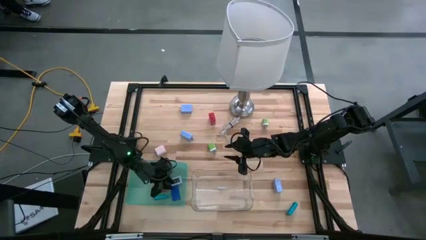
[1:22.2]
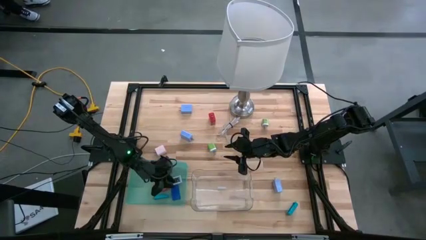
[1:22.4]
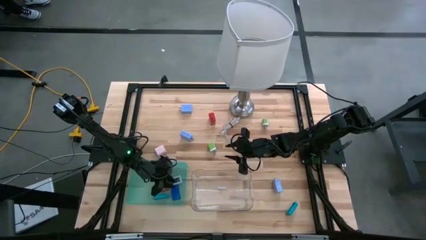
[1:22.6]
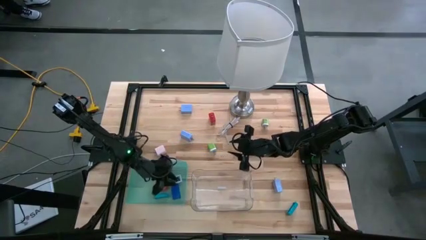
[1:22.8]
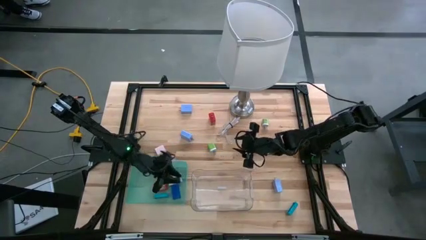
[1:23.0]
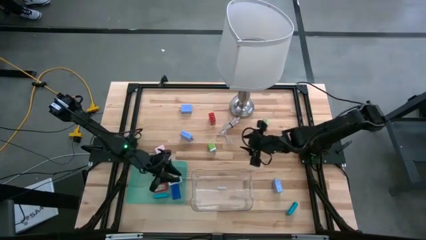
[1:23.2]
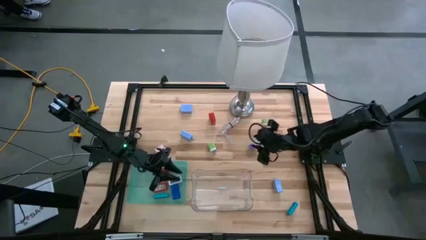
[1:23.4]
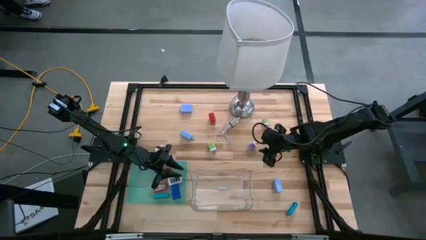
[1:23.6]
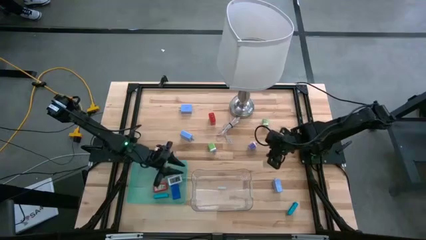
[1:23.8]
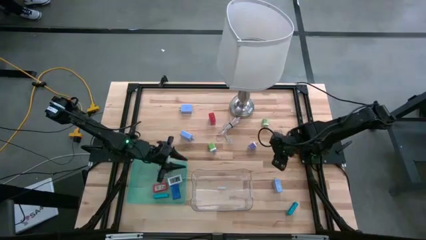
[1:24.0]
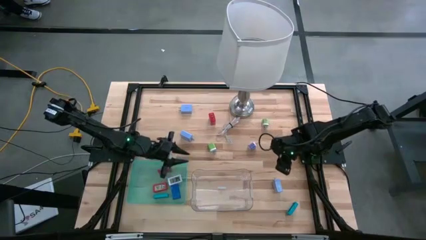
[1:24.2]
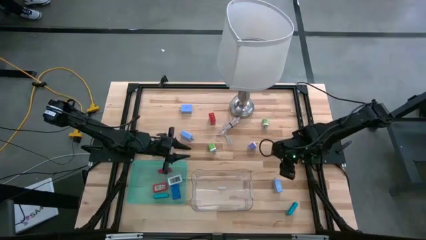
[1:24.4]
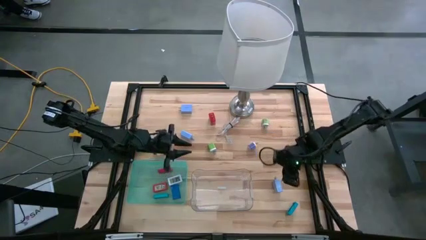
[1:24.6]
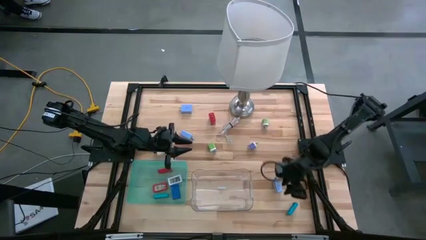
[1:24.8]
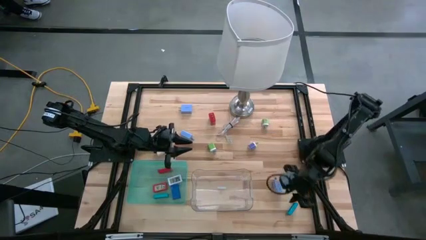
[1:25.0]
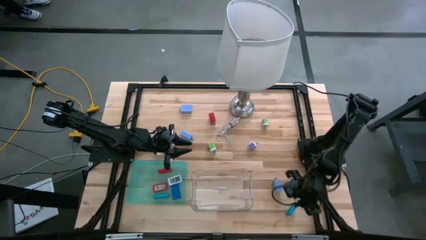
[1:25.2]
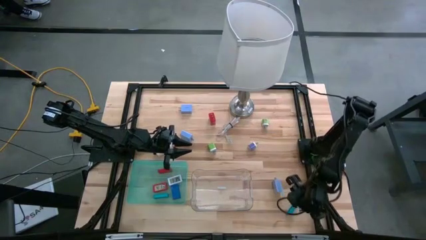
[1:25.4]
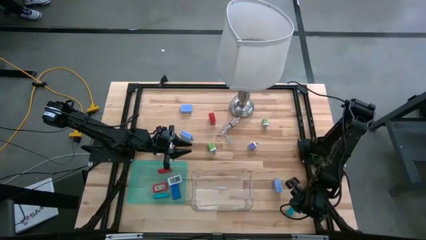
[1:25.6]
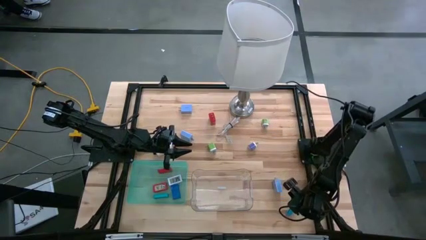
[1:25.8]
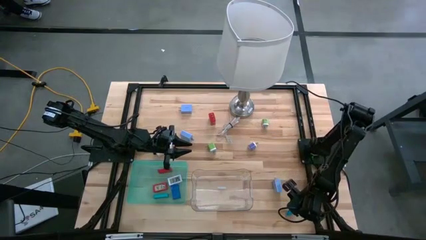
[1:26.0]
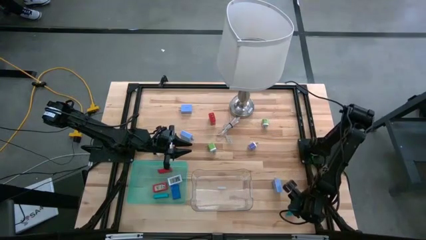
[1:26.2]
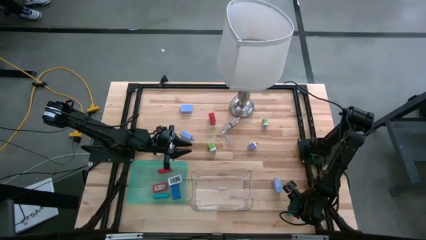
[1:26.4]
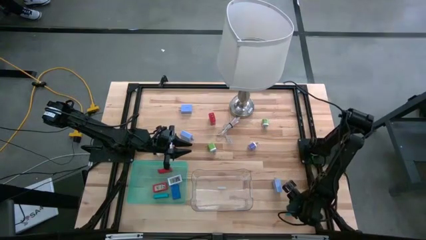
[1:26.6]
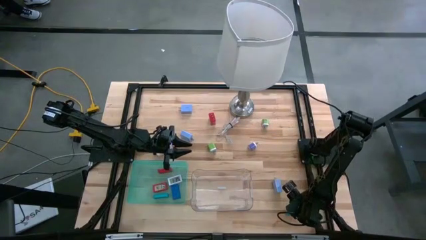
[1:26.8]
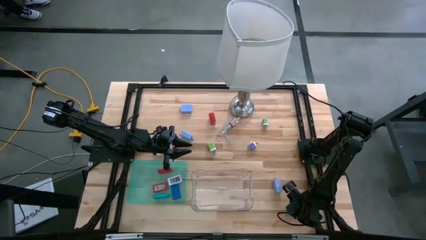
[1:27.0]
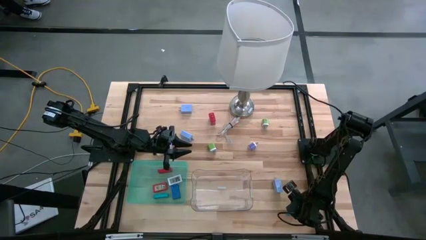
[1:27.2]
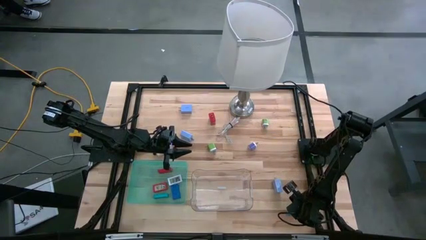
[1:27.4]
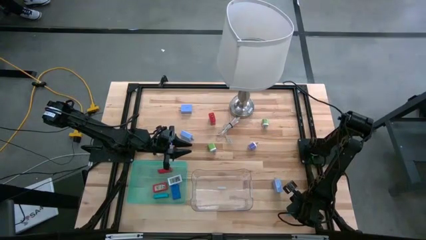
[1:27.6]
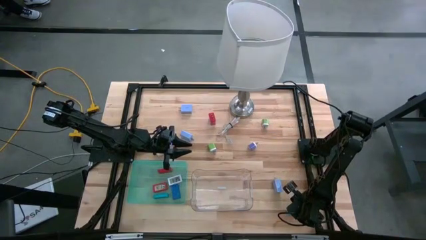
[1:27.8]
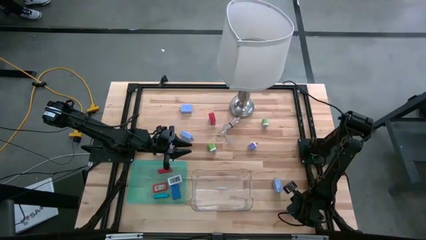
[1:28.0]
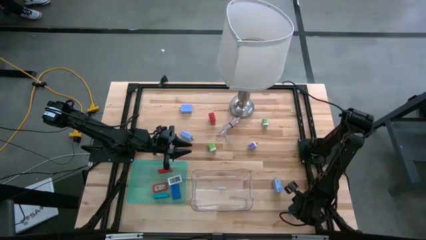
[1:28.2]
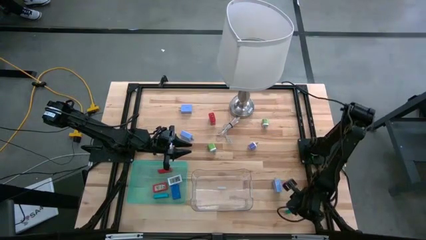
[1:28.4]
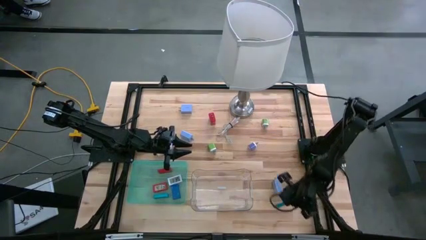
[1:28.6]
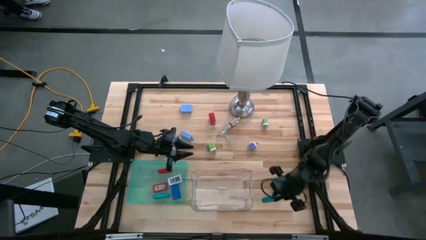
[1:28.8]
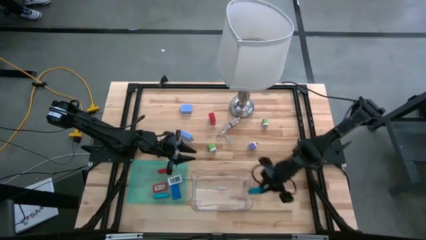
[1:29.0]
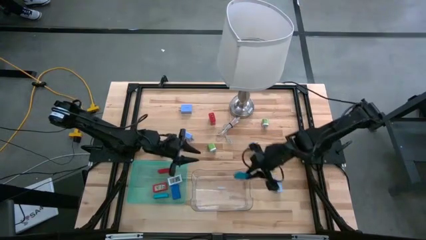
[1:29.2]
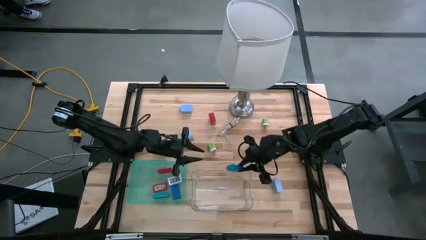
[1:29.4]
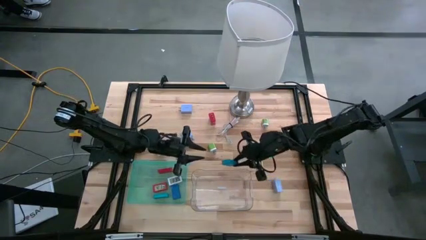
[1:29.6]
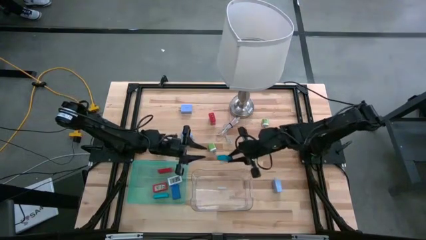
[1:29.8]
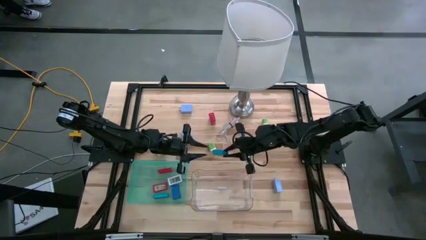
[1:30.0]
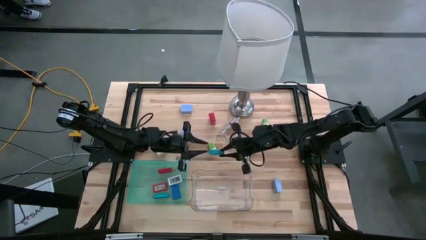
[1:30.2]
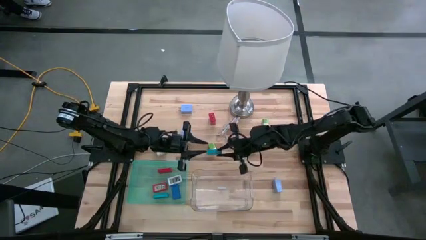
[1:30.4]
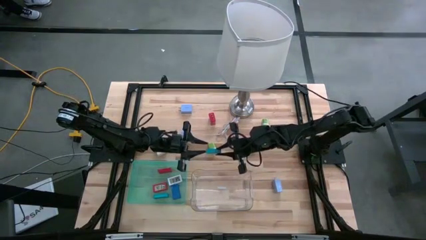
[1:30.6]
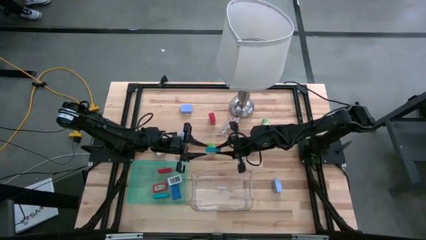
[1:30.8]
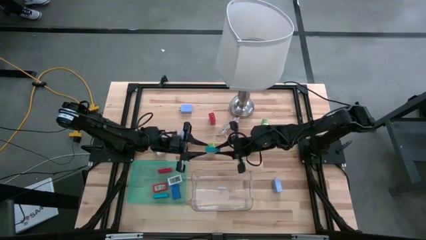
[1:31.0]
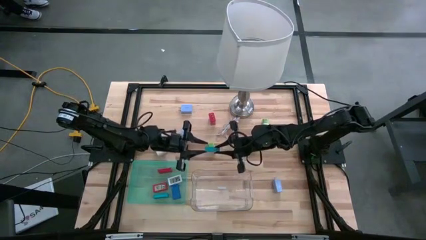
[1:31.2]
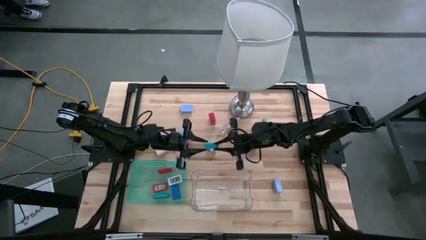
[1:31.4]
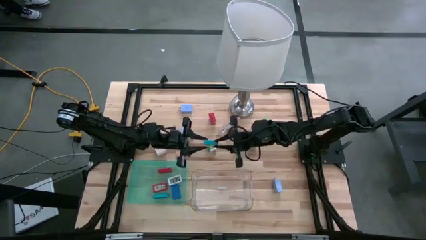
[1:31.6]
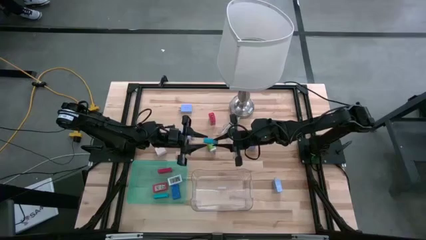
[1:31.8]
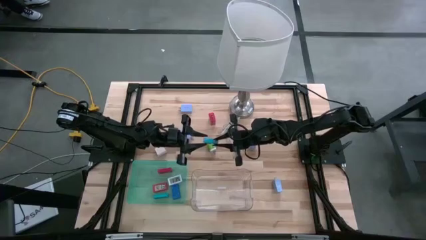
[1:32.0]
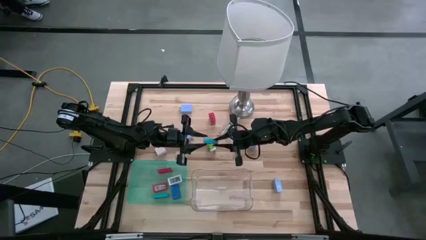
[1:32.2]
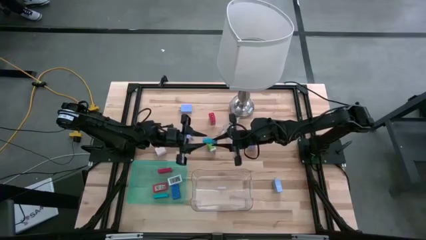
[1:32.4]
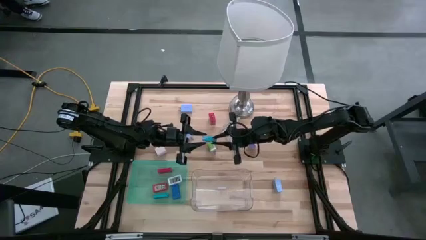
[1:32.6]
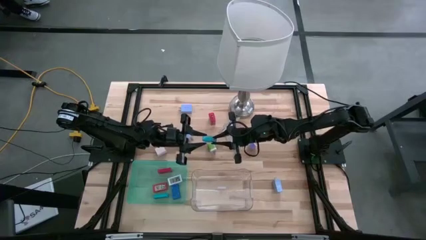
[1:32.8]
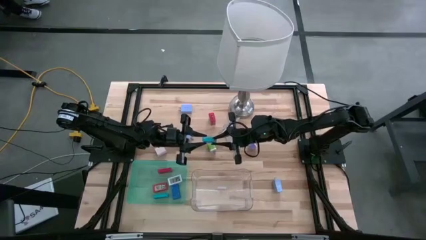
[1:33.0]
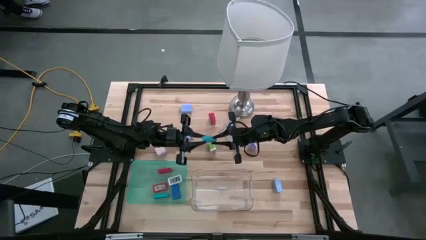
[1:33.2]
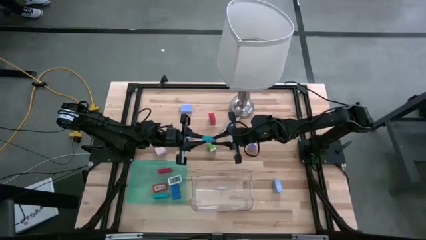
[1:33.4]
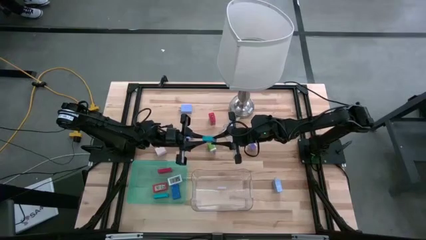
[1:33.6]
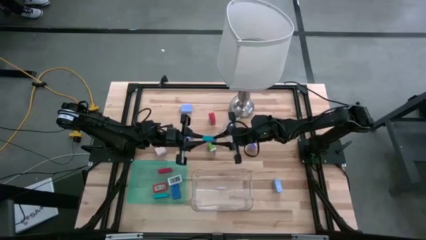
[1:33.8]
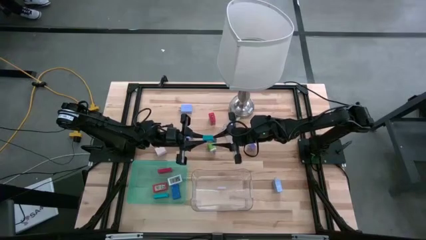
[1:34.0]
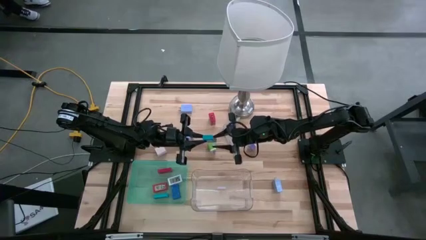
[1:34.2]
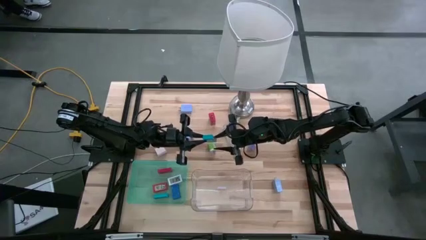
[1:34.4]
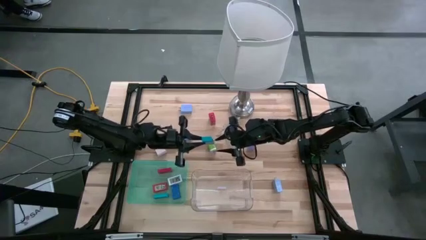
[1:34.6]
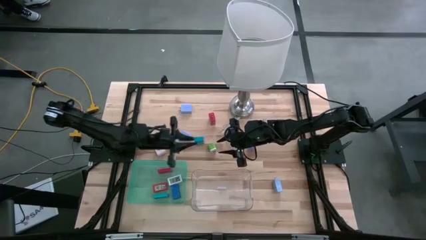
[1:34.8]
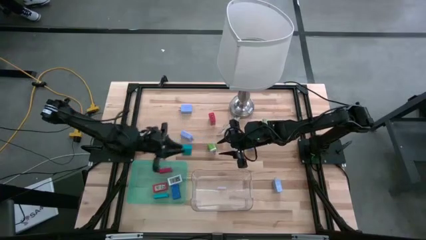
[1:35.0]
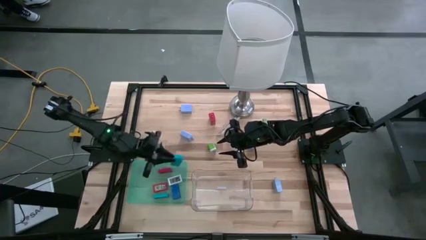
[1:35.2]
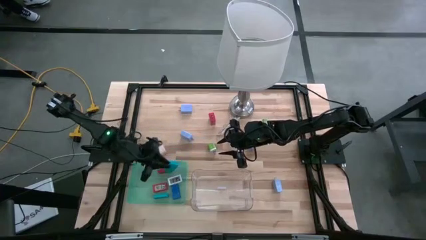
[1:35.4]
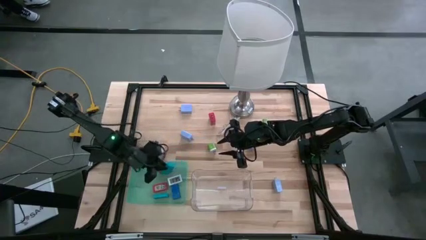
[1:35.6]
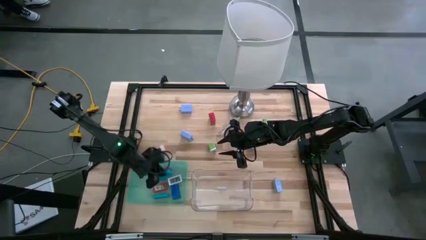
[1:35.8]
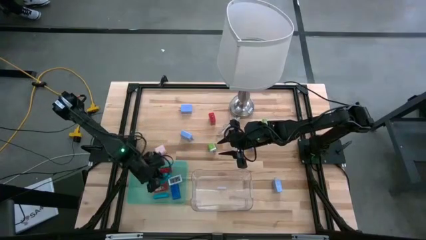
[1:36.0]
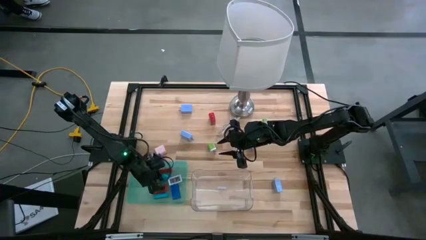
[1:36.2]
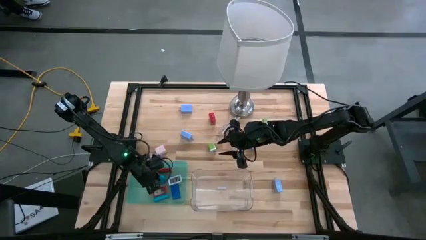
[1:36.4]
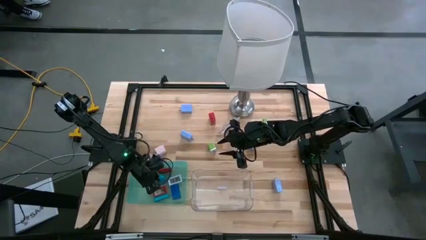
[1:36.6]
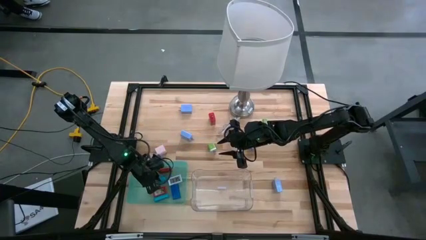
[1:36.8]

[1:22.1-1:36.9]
Task: Pick & Place Office items
Put the light blue timer into the green bin

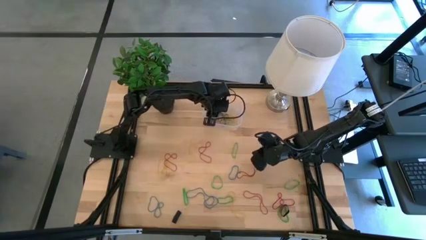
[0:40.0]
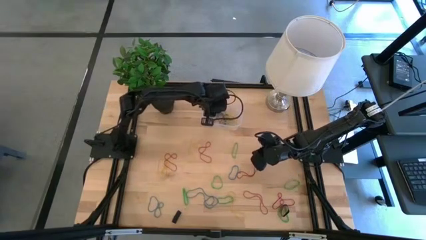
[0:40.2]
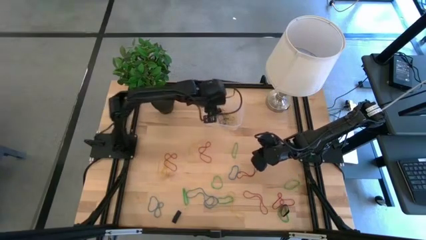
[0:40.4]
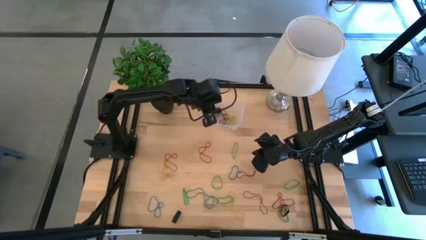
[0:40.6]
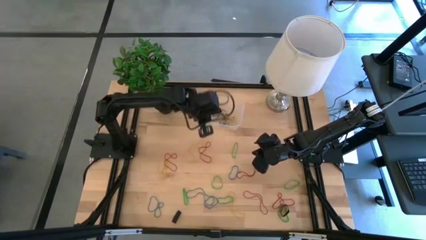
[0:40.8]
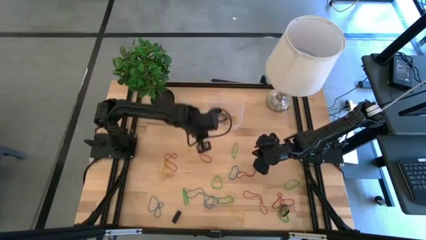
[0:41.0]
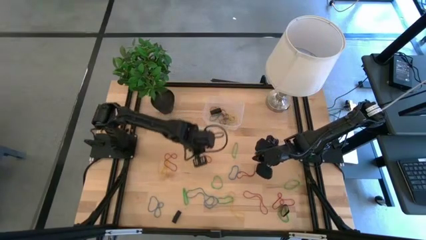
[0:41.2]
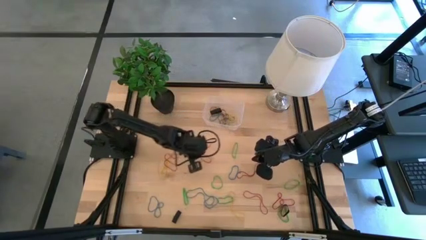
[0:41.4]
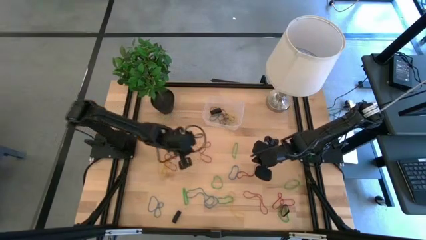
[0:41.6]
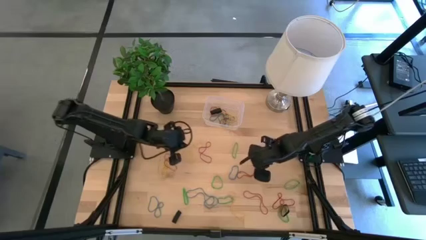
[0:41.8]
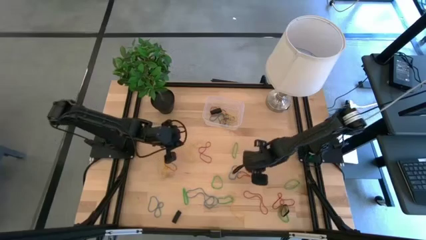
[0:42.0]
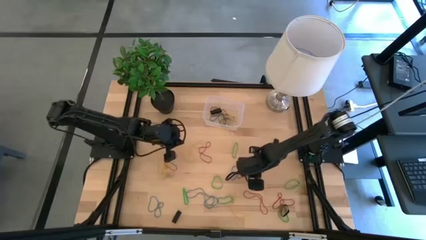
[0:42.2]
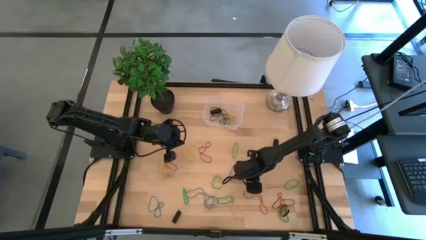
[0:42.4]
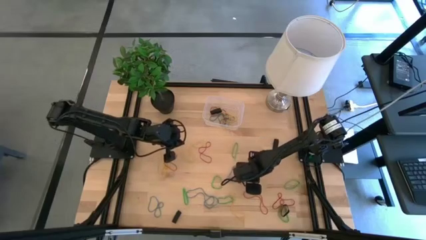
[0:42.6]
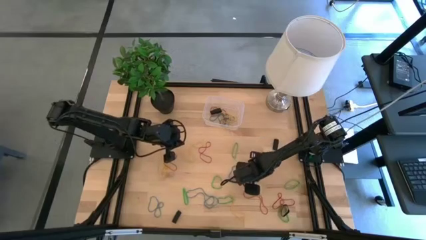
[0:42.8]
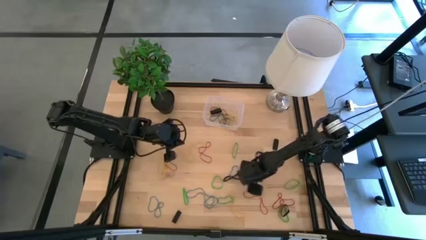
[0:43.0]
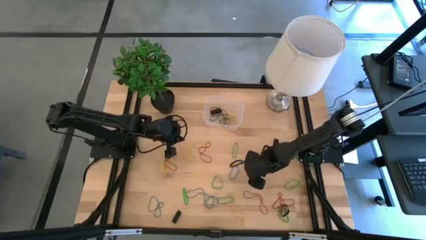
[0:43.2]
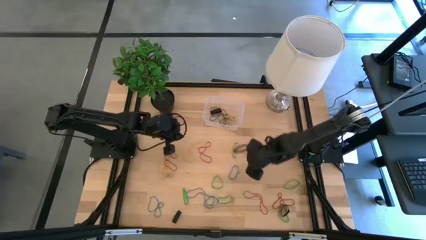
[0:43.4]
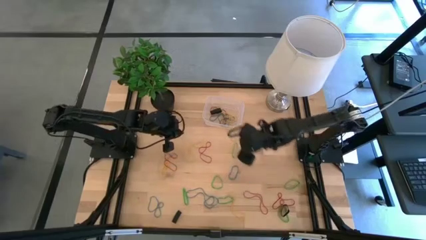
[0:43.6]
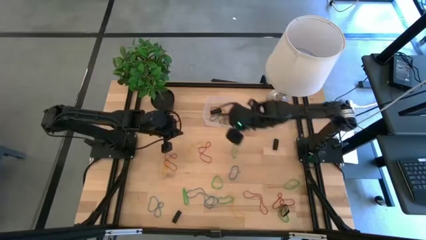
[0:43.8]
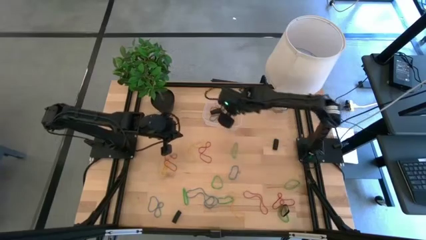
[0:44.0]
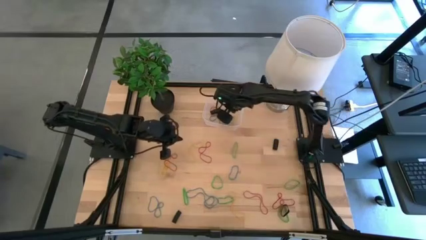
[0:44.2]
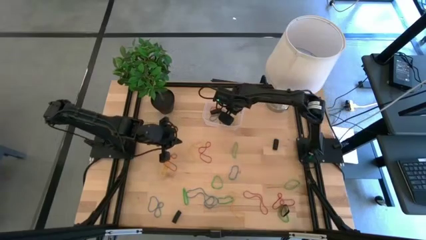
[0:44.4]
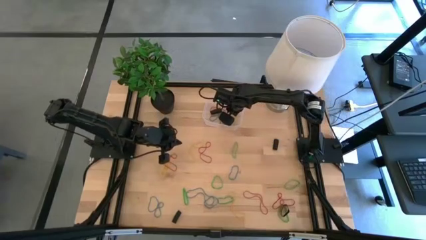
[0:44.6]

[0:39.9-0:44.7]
Task: Pick and place rubber bands into bin
Put the red rubber band into the transparent bin
